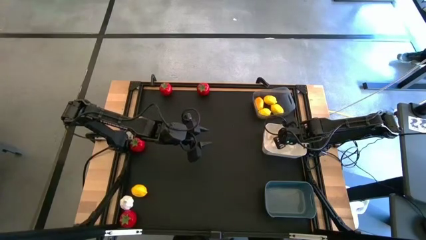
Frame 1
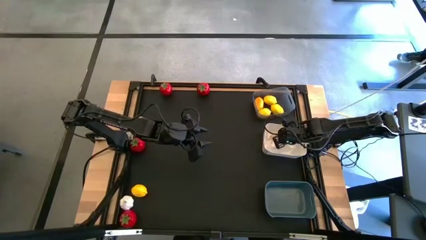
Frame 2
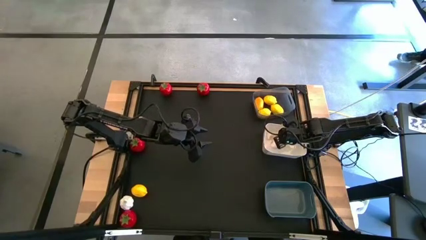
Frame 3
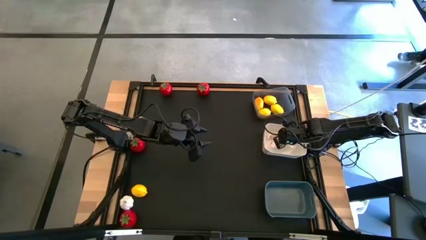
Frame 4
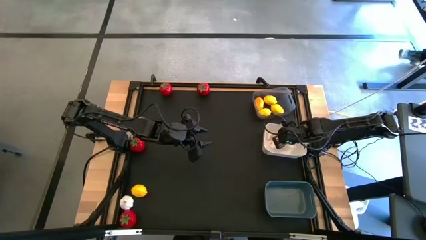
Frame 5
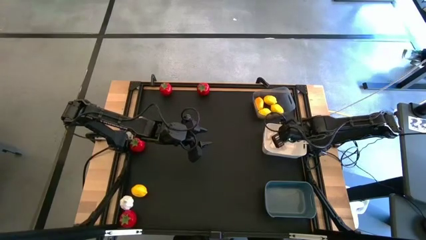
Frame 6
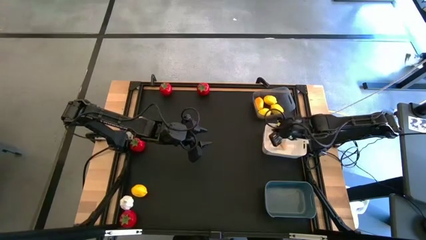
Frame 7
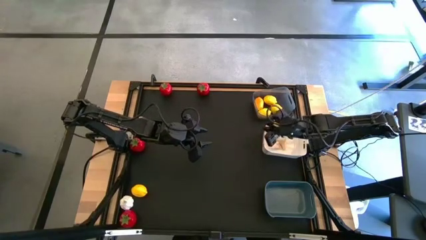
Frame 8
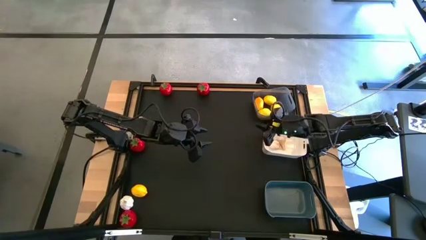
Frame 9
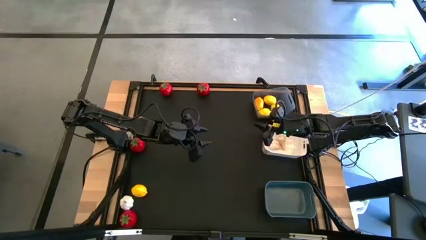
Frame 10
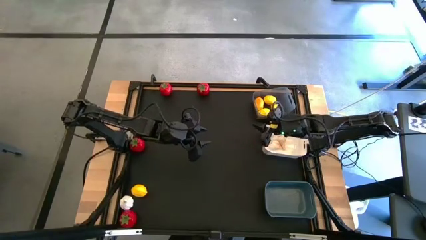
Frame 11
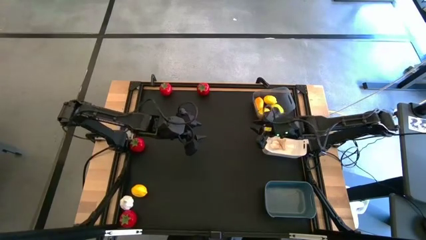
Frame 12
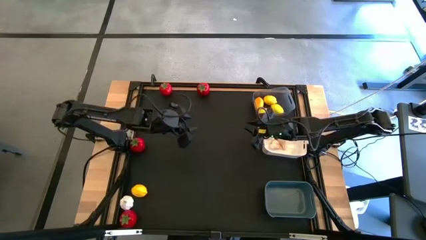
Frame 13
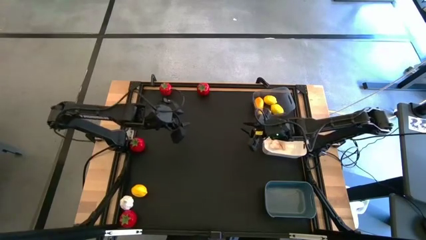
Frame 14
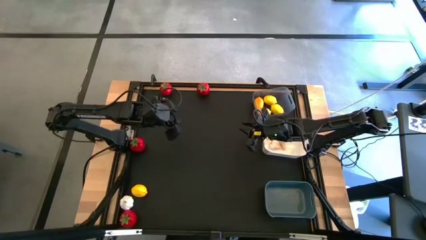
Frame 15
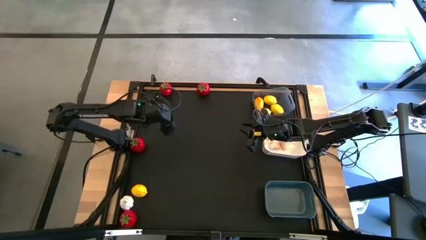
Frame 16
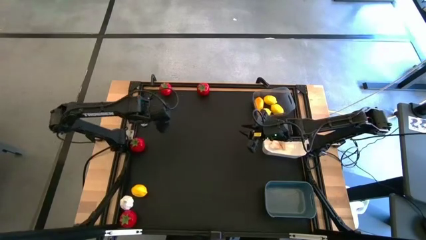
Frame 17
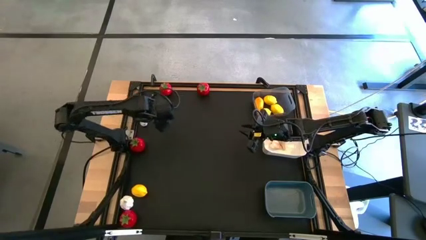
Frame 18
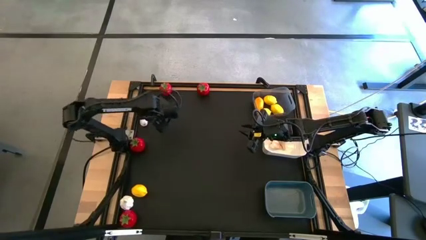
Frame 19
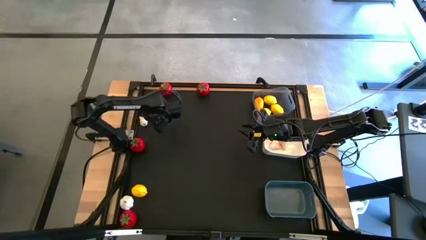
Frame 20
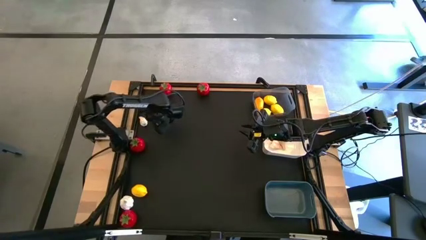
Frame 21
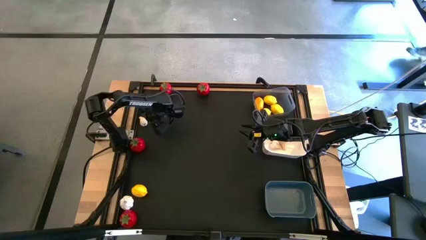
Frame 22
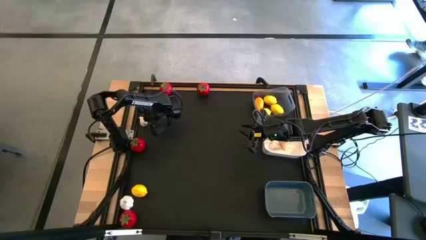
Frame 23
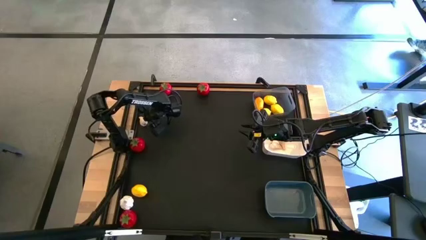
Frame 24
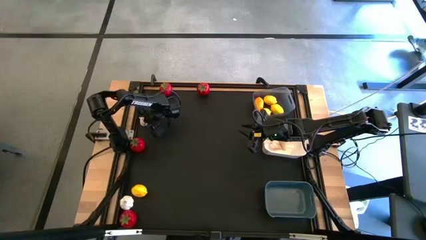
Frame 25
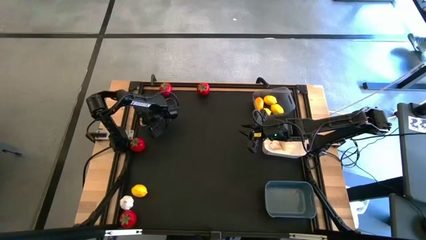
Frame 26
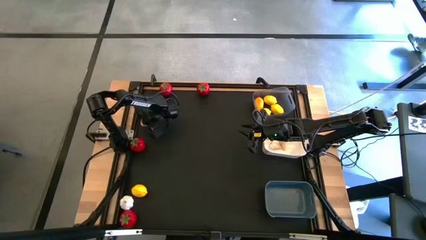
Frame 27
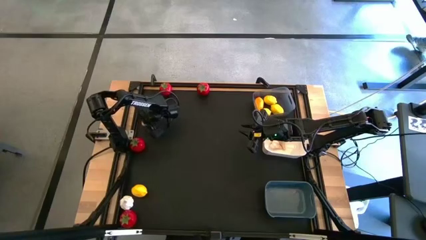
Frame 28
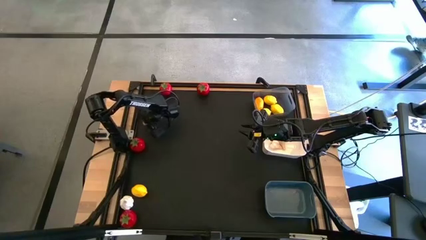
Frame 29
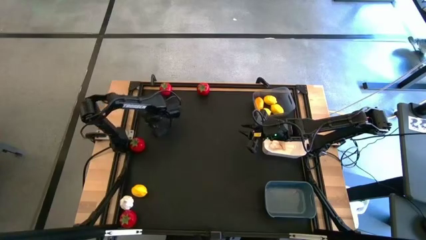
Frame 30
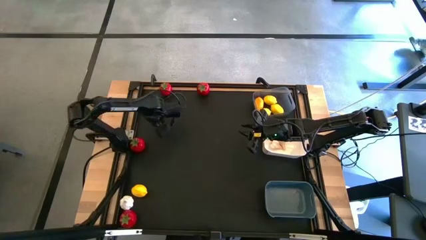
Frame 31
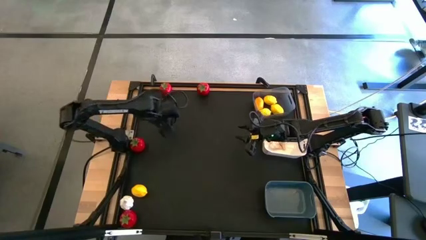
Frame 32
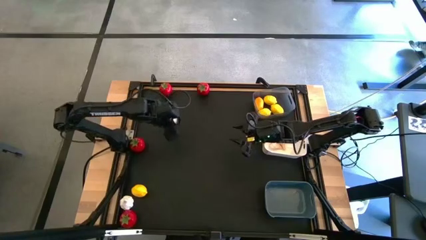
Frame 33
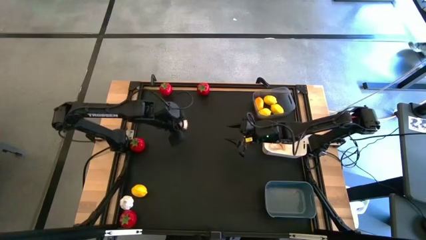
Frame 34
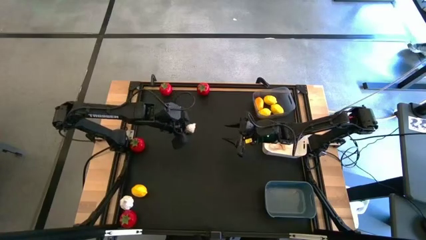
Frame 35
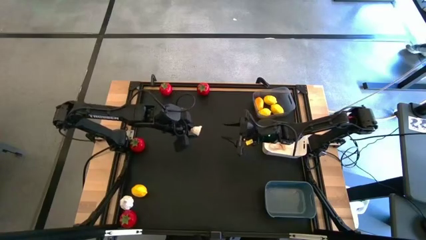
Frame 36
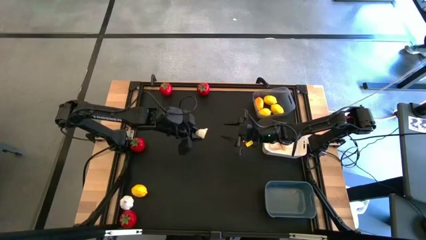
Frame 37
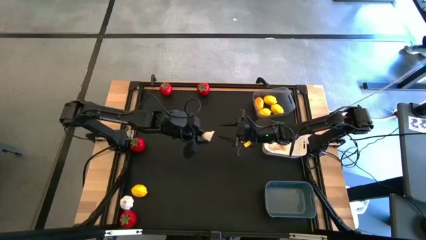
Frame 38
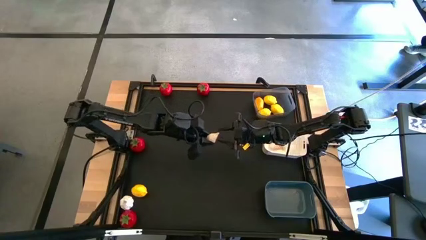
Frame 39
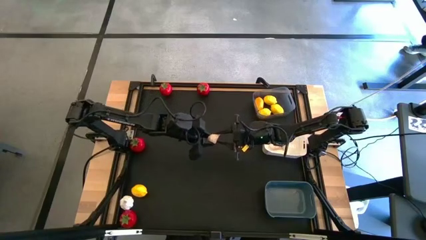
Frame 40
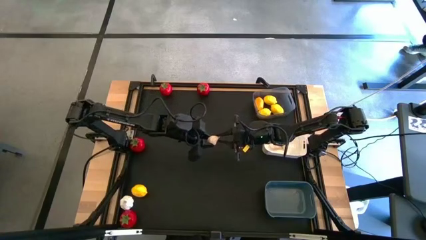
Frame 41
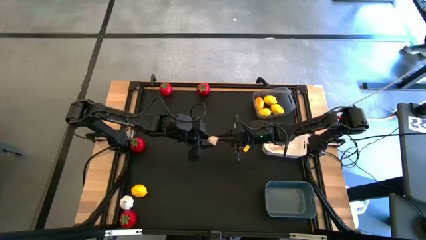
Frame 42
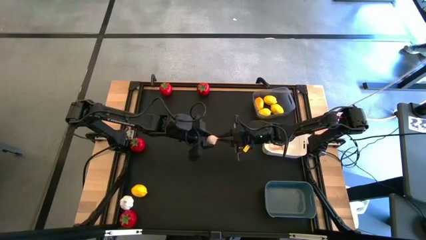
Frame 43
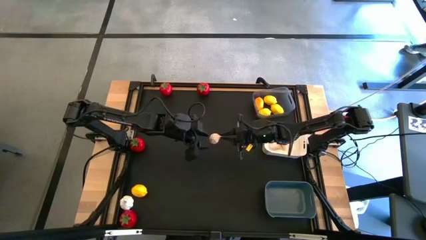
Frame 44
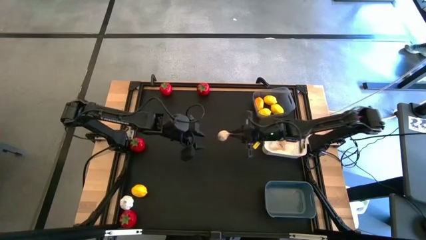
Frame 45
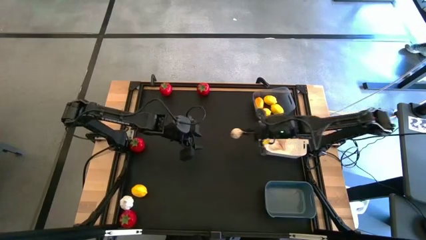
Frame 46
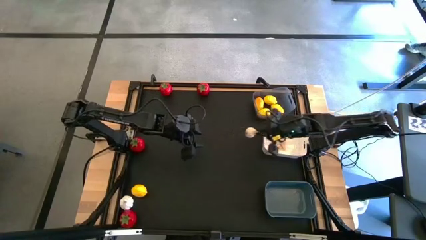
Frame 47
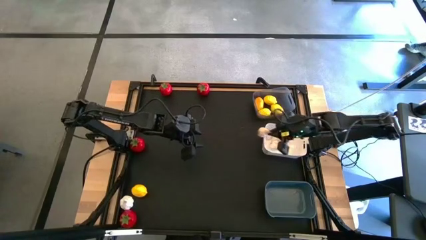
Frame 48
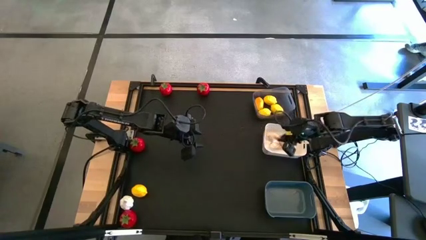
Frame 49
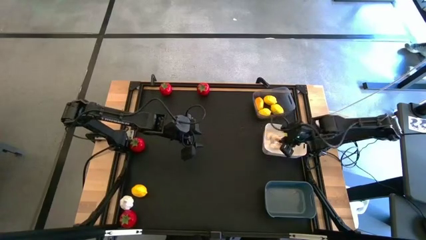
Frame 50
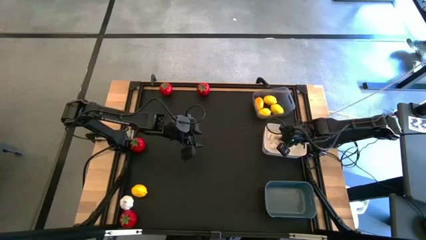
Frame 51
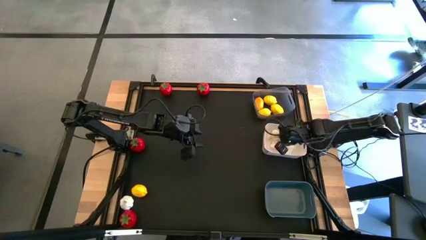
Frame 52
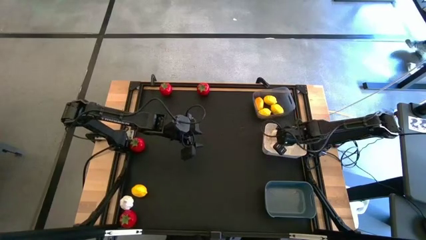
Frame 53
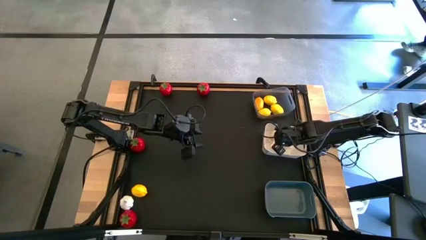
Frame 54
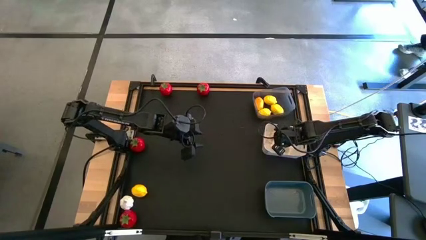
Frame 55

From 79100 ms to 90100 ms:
Task: Sort produce into baskets
Put the garlic into the white bin

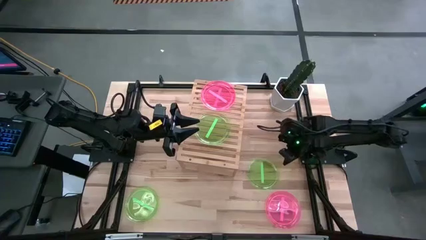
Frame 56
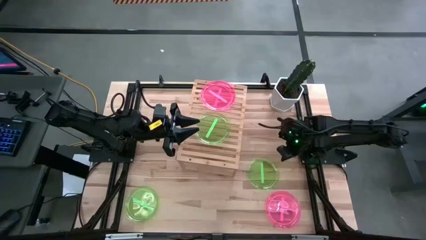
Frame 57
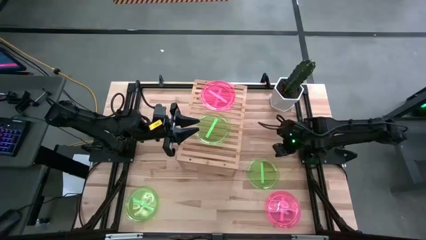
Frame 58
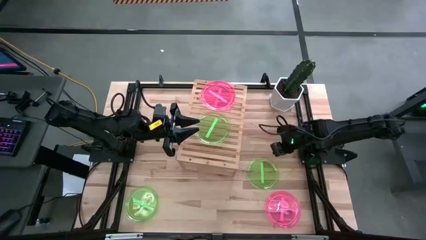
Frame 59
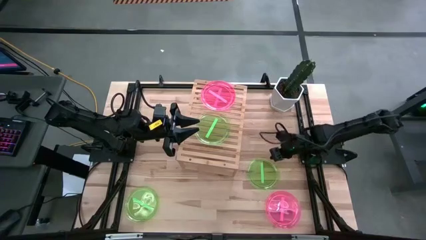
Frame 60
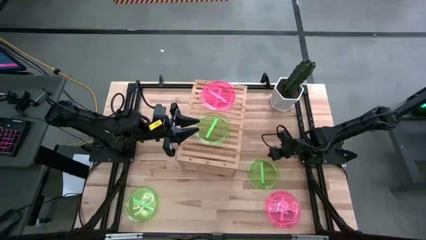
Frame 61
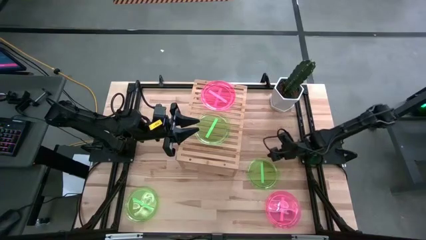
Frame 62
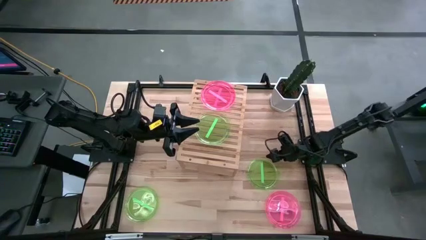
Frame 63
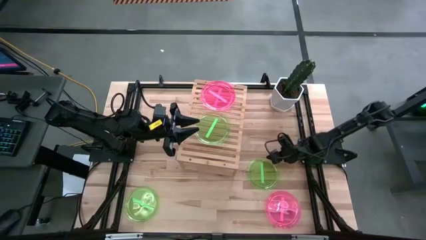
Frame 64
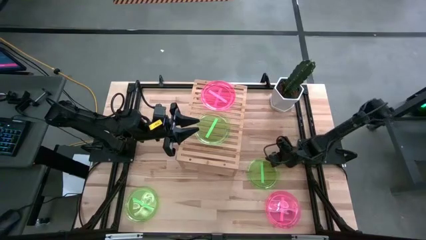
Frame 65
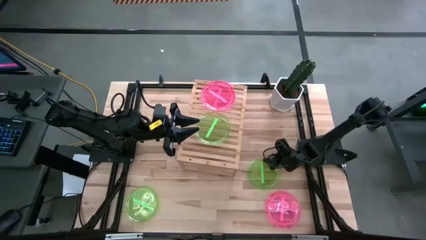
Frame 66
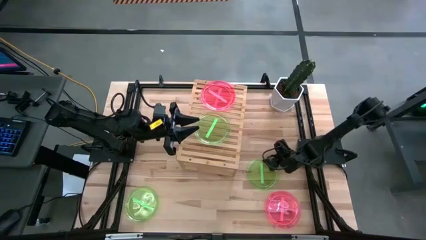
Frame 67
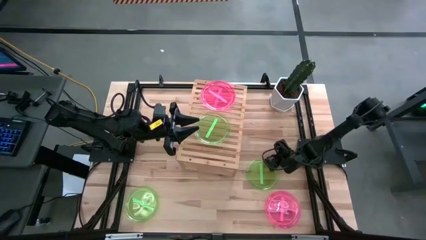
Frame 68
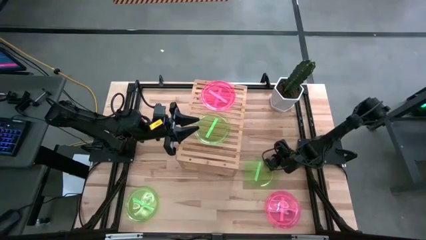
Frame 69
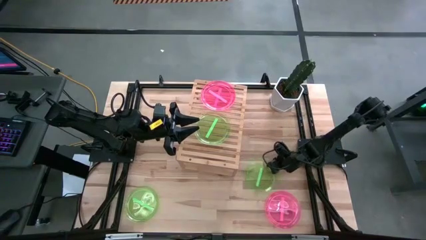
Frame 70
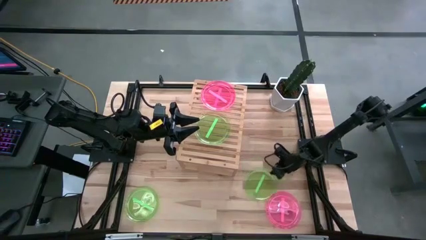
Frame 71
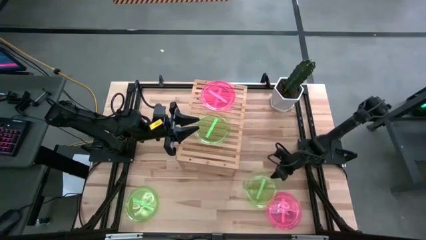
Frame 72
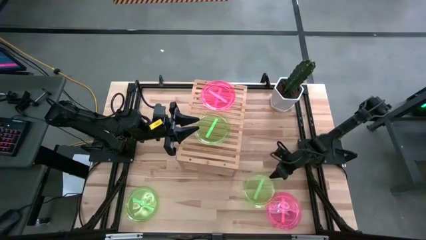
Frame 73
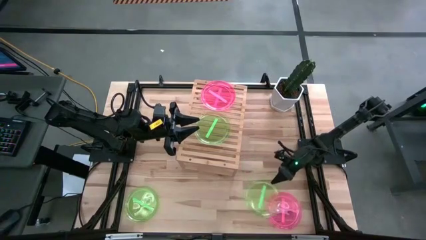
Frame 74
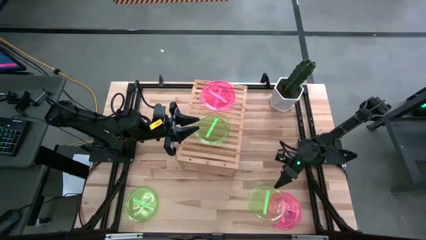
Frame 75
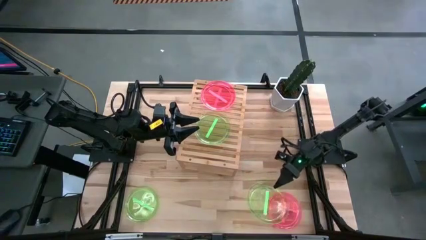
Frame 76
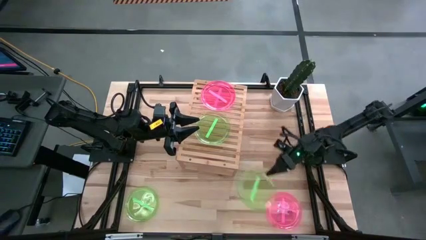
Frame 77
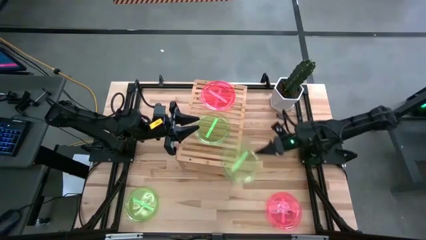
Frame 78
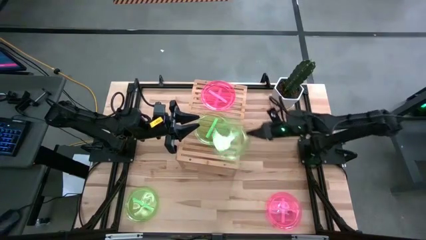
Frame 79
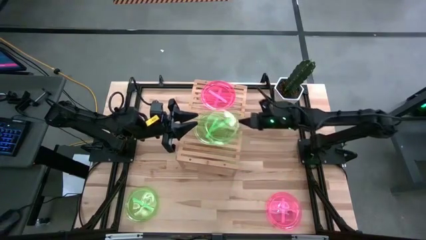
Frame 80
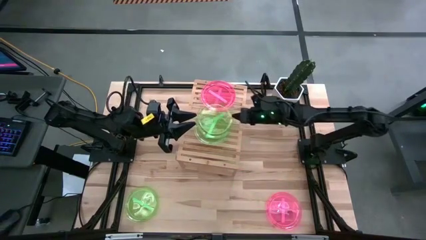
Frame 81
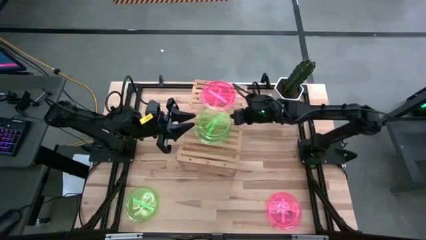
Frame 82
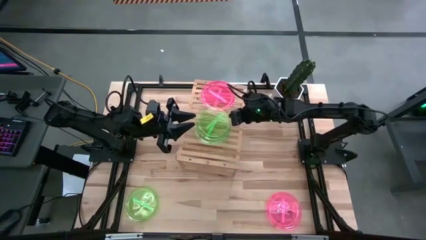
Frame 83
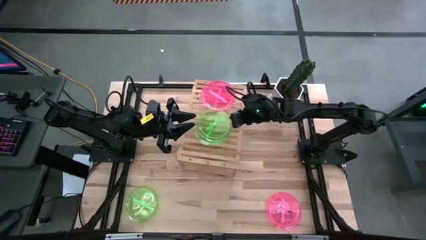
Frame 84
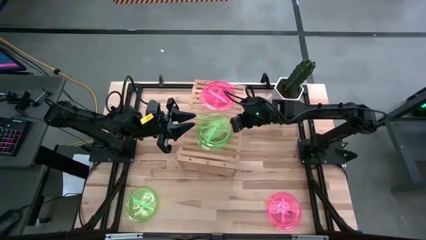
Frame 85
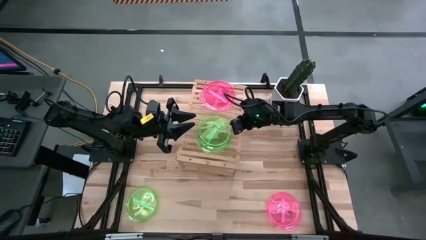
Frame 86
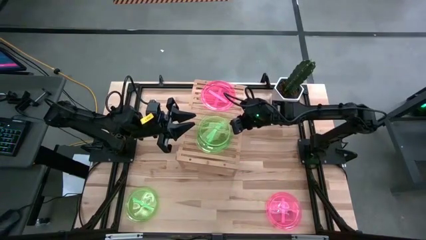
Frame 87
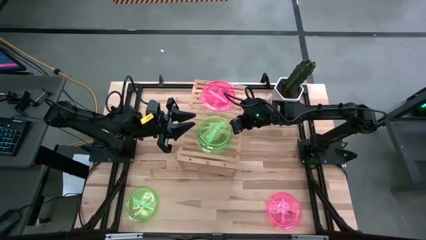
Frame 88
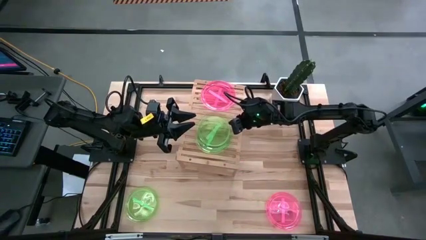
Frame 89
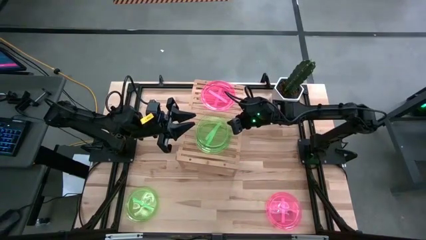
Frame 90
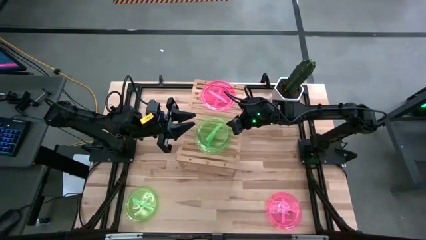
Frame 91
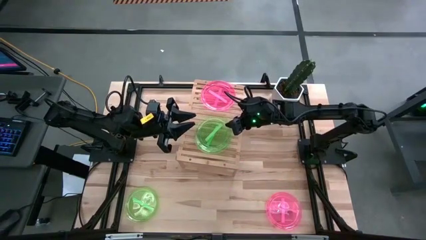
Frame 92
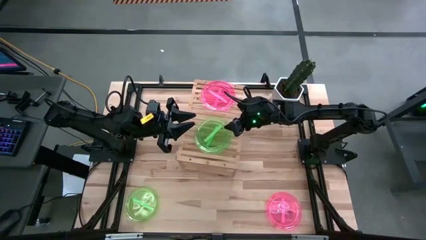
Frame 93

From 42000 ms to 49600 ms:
Task: Place and stack plates onto a shelf
Stack the top green transparent plate on top of the other green transparent plate on the shelf
